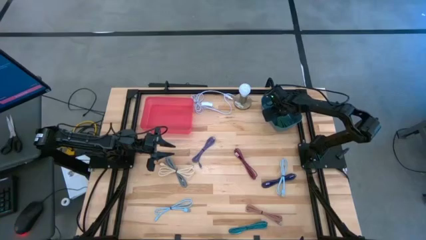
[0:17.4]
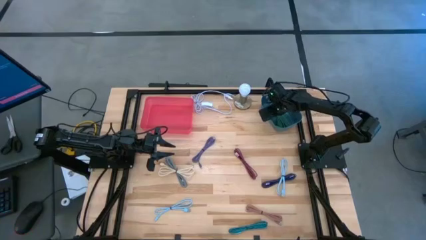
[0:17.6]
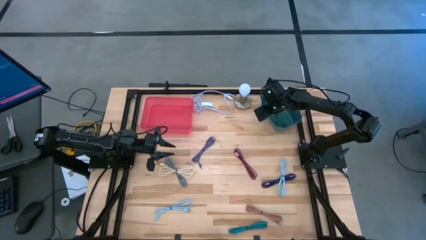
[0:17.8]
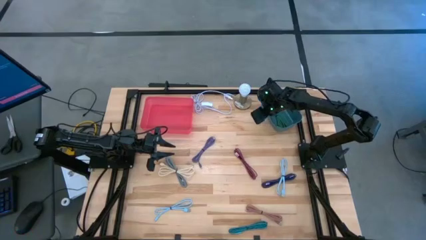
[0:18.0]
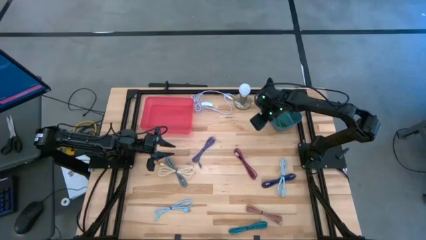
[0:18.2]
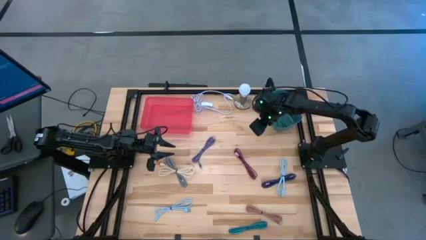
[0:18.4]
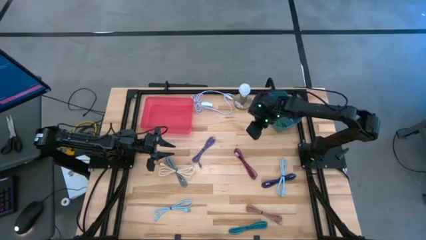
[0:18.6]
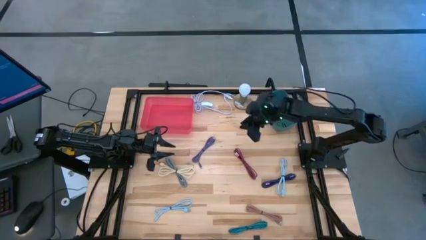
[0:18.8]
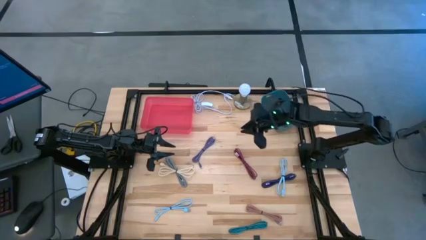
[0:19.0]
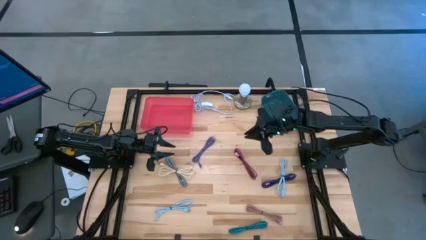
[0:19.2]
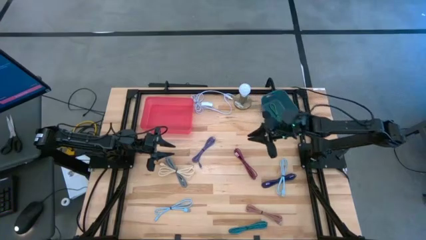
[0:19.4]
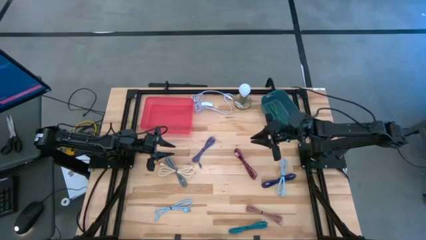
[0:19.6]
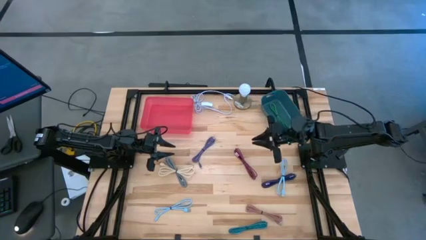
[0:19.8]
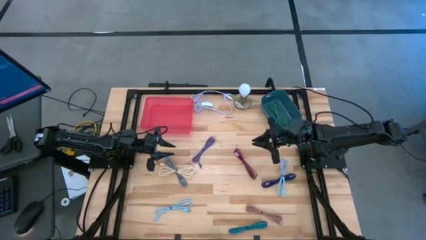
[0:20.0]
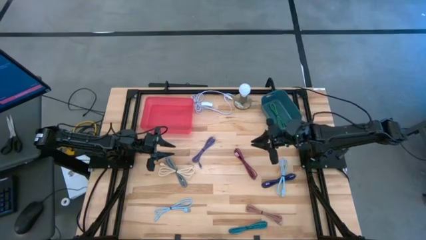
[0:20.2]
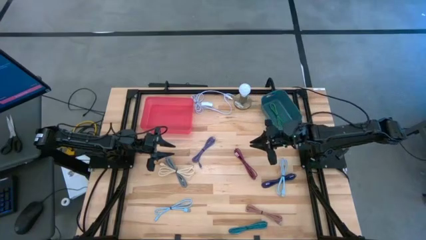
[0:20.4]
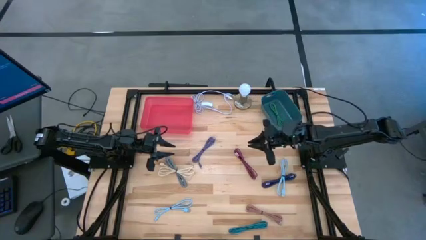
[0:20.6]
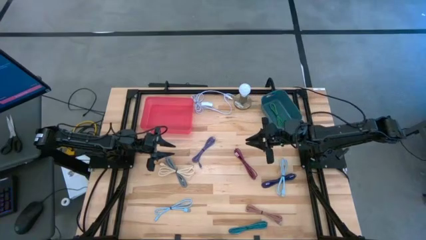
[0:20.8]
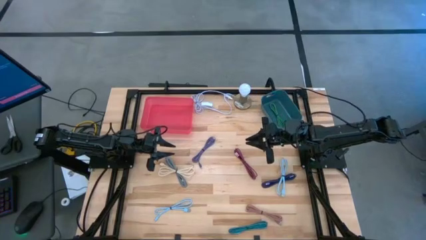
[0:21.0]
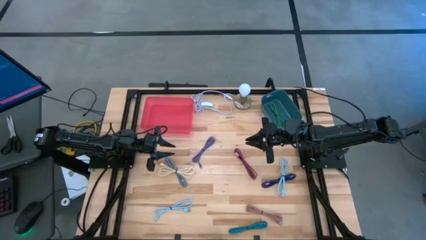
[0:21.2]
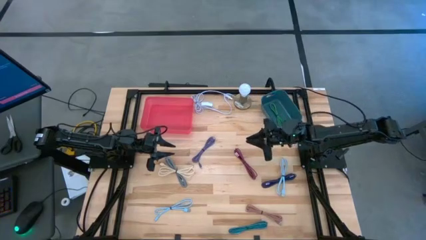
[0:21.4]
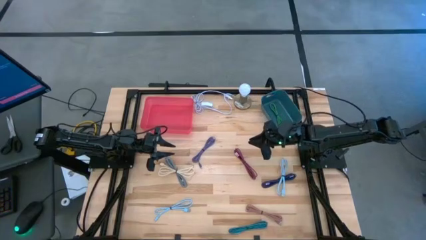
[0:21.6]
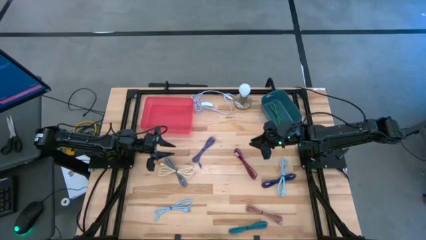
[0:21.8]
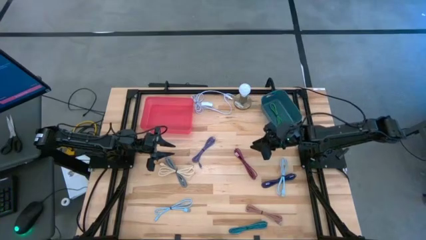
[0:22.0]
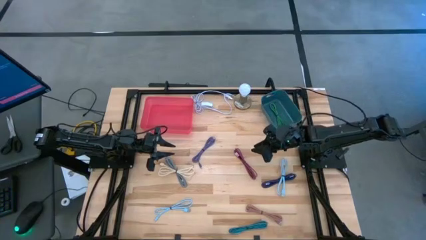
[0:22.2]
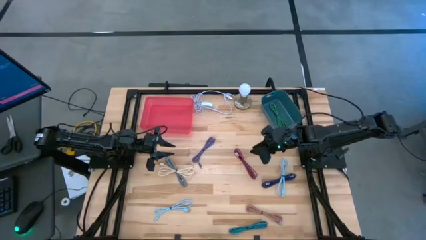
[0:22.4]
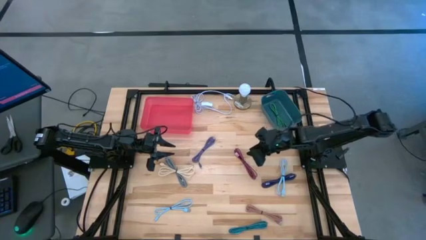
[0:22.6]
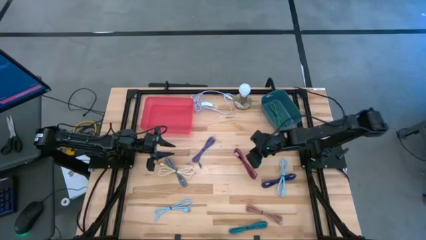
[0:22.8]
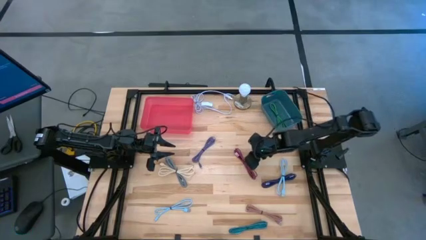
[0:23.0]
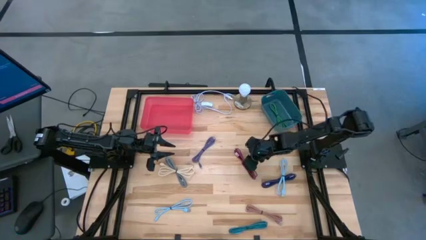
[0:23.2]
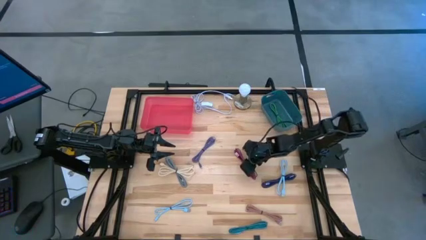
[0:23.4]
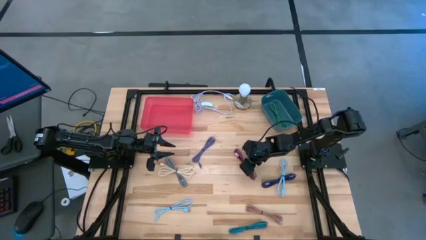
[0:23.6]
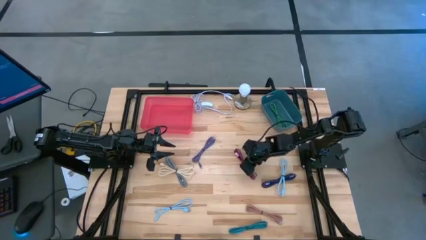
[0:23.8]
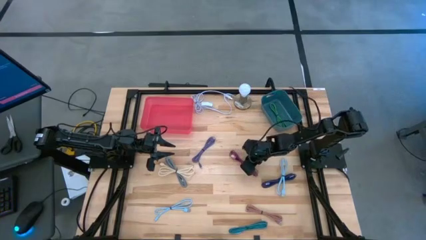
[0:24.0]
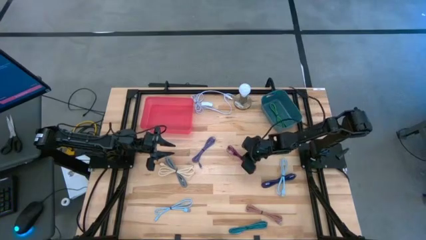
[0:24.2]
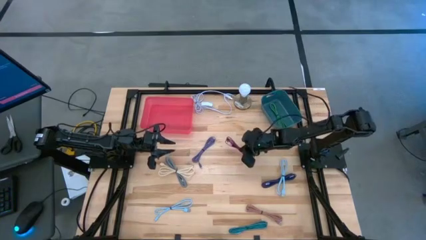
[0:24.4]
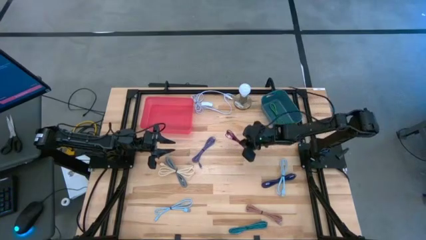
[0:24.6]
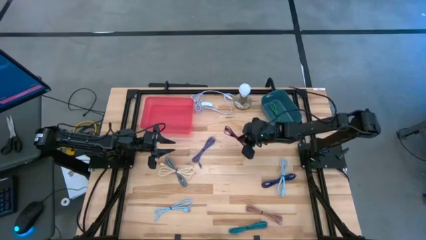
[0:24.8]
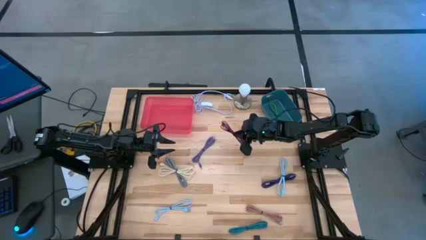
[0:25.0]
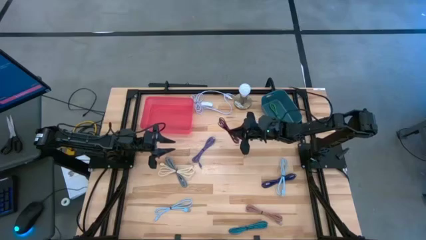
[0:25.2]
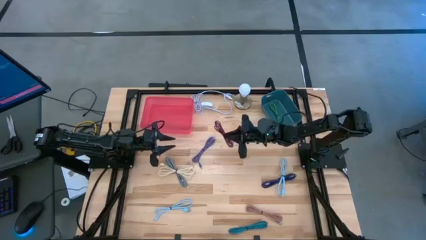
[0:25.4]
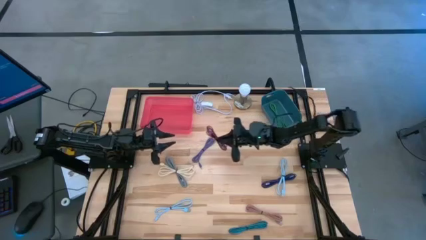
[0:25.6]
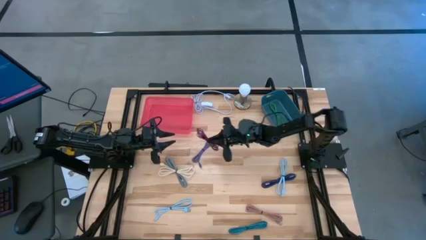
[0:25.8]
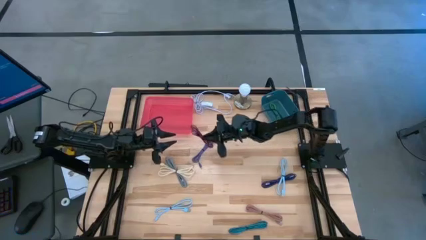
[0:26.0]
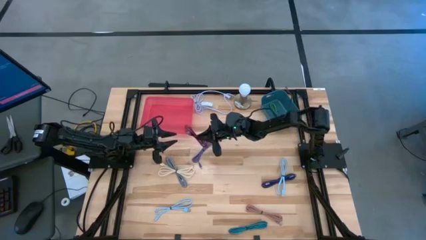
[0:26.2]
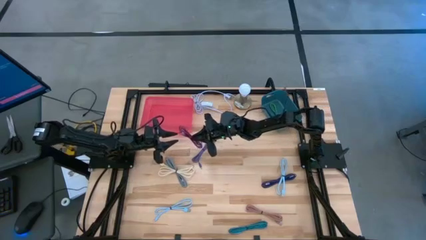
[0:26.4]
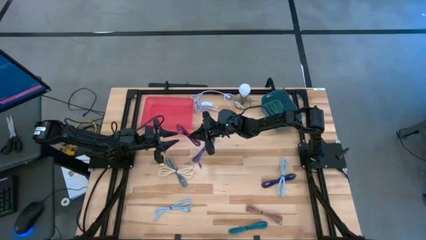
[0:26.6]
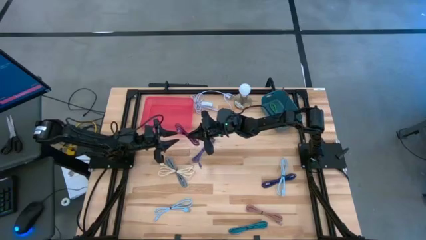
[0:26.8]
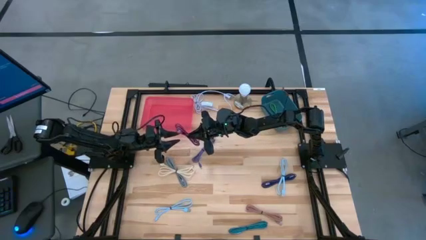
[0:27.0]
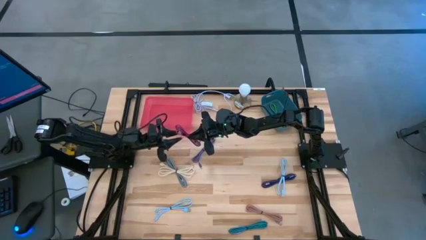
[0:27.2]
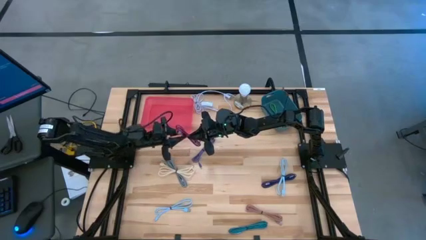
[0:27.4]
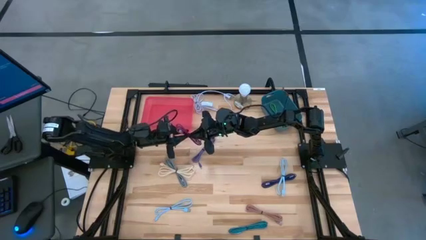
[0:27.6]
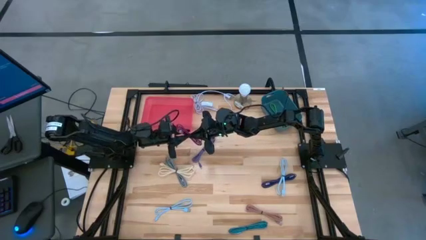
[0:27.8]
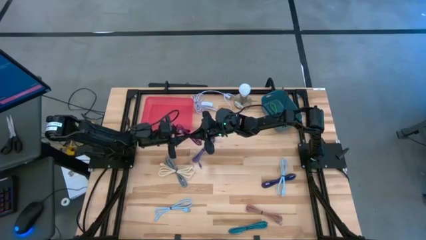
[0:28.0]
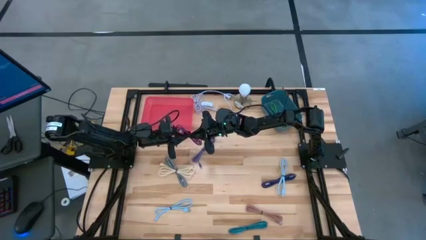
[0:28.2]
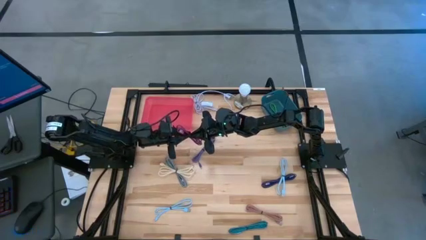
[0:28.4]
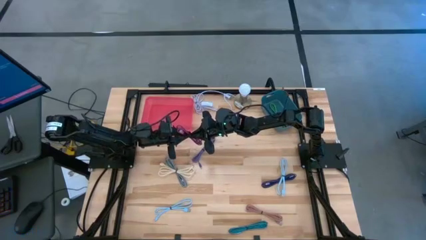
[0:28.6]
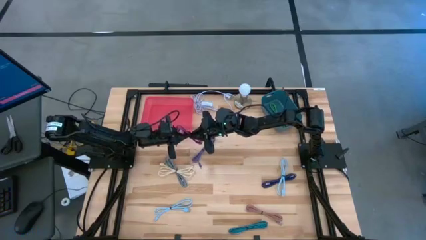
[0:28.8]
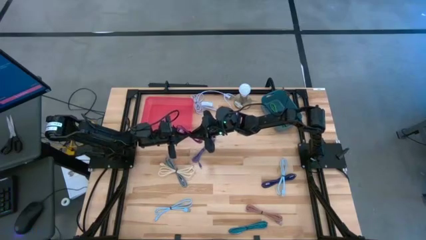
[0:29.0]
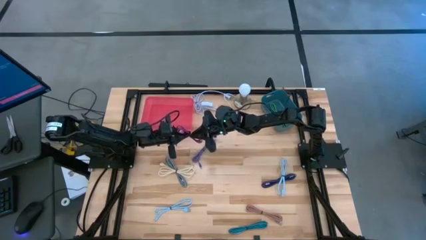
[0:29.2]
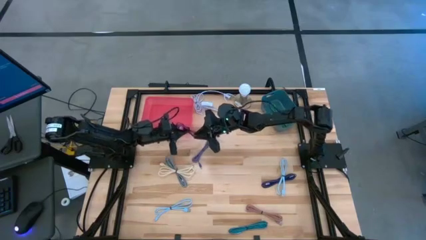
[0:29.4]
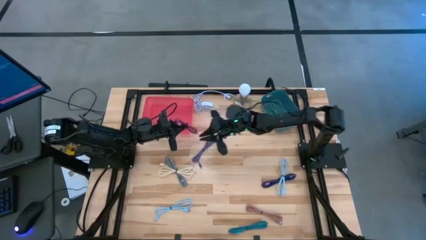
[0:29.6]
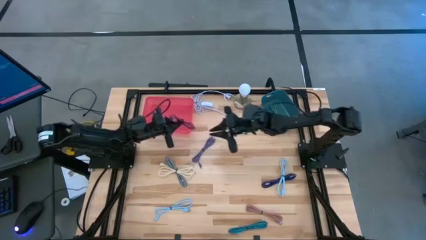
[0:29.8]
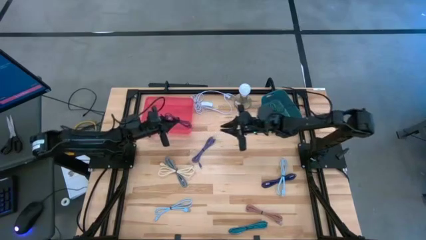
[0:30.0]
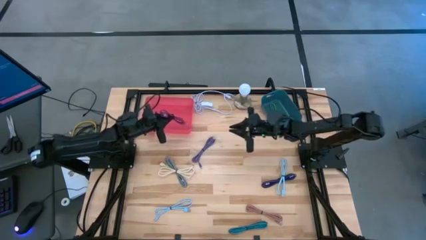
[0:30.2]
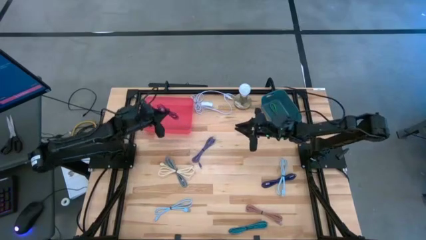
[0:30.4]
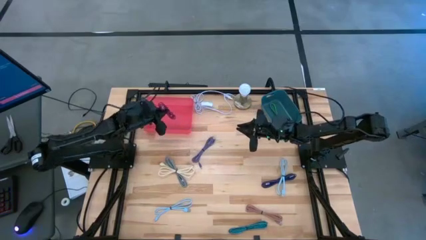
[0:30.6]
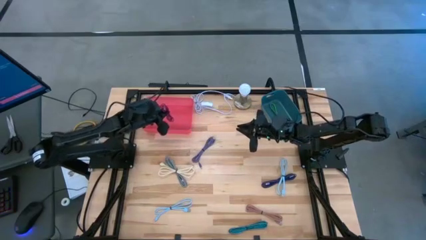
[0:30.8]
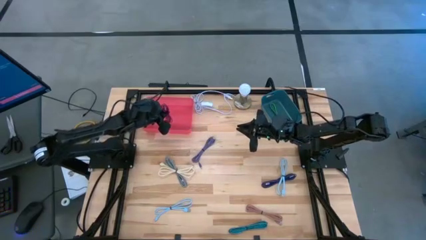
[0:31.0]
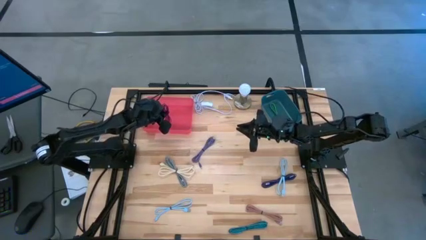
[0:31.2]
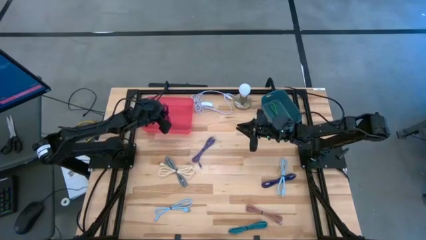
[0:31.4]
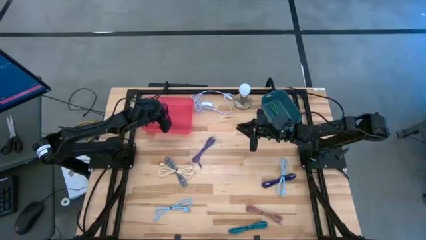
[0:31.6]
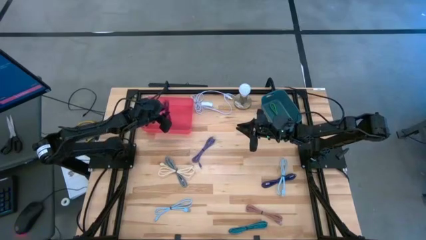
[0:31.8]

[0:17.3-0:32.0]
Task: Pick & Place USB Port
Put the black and pink charger cable into the pink bin
